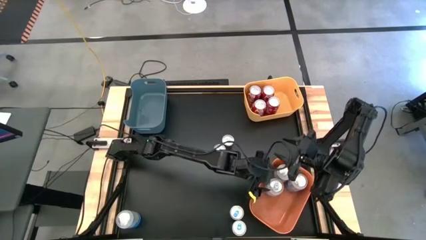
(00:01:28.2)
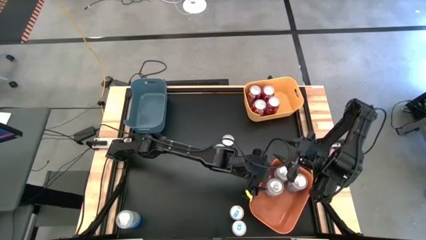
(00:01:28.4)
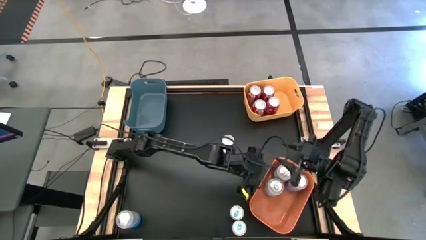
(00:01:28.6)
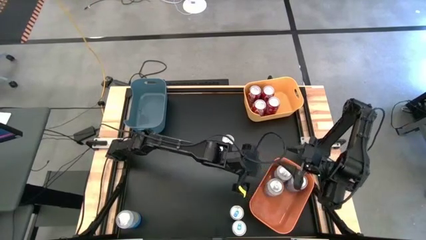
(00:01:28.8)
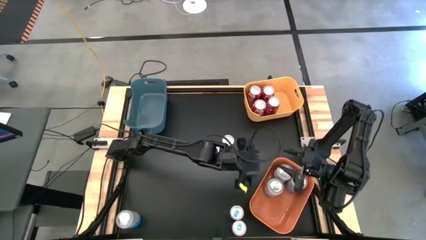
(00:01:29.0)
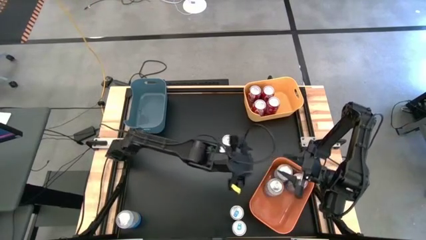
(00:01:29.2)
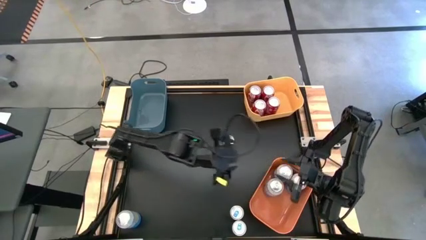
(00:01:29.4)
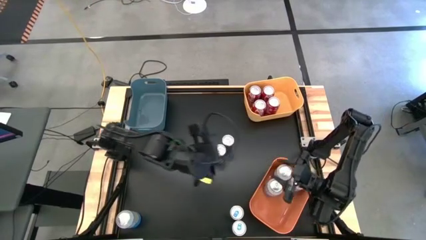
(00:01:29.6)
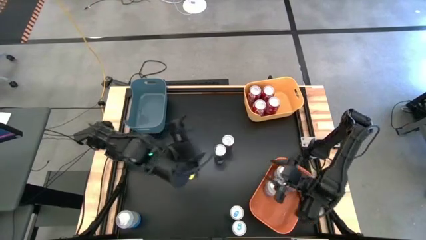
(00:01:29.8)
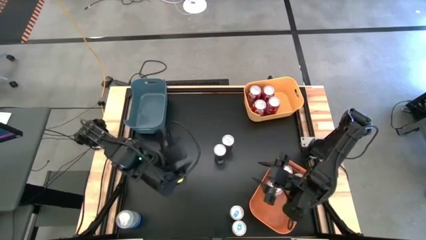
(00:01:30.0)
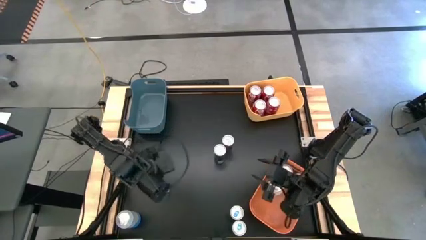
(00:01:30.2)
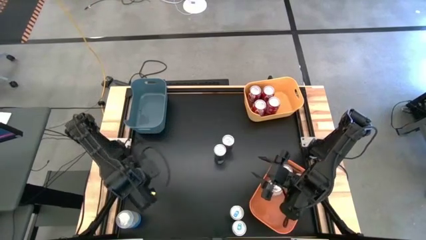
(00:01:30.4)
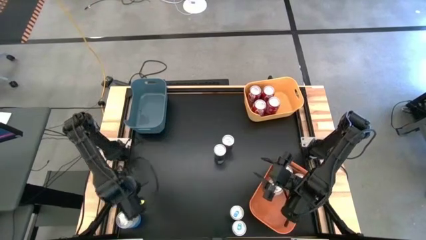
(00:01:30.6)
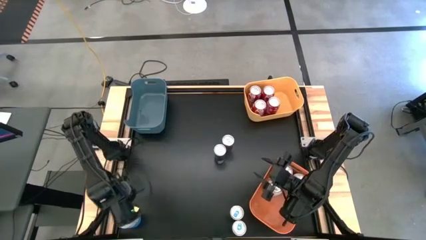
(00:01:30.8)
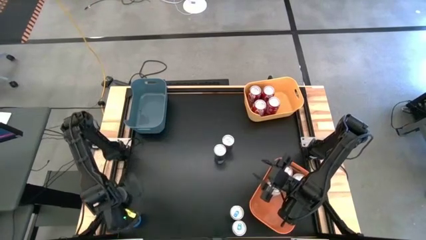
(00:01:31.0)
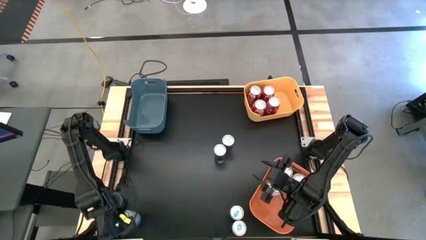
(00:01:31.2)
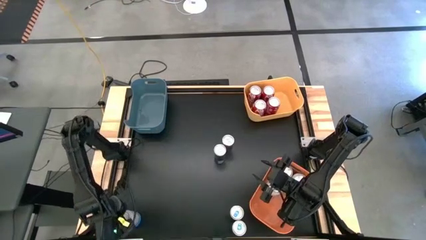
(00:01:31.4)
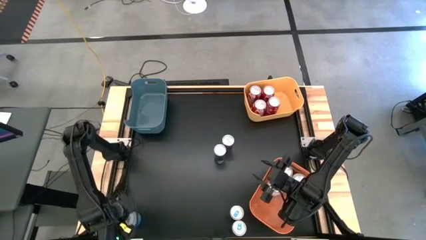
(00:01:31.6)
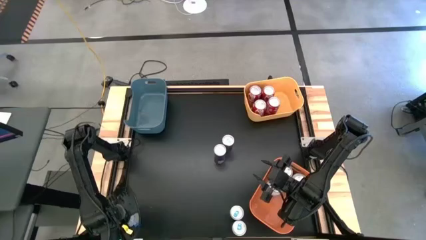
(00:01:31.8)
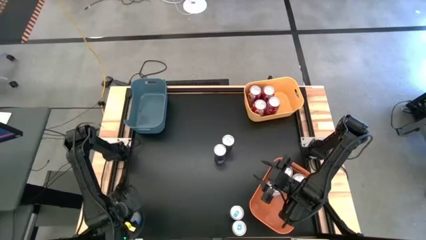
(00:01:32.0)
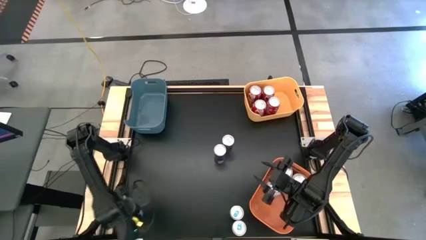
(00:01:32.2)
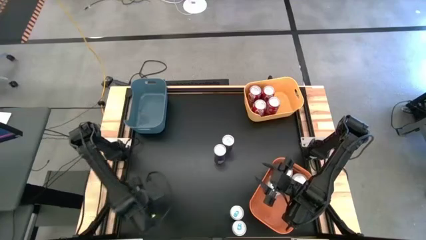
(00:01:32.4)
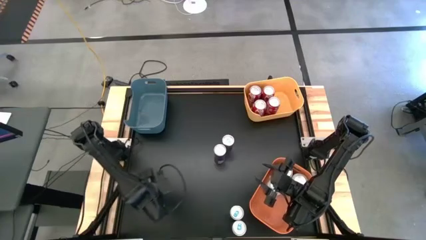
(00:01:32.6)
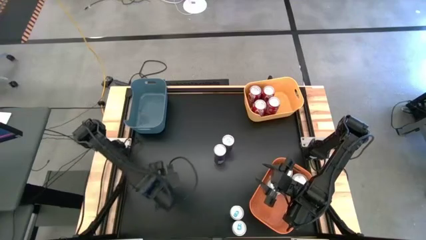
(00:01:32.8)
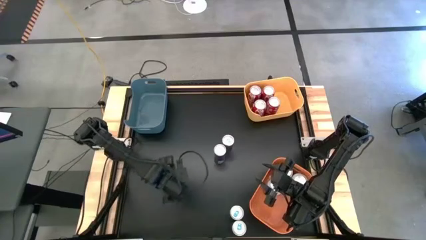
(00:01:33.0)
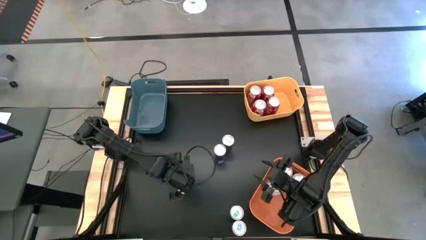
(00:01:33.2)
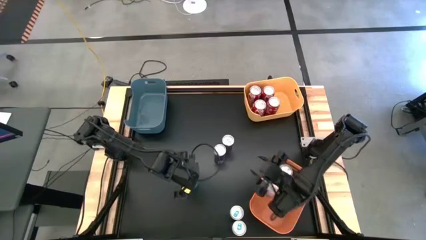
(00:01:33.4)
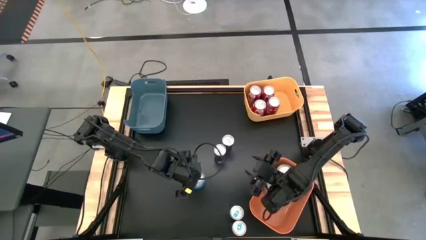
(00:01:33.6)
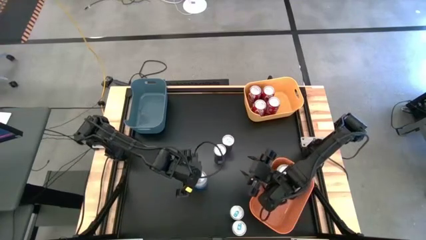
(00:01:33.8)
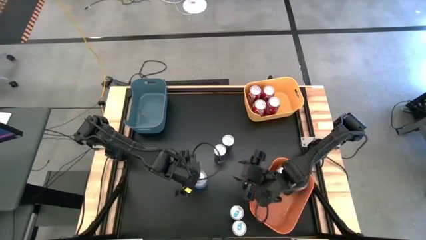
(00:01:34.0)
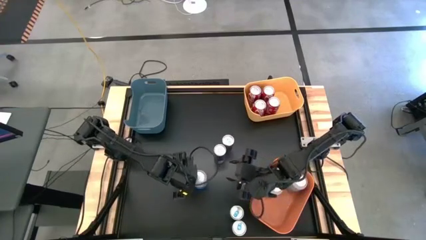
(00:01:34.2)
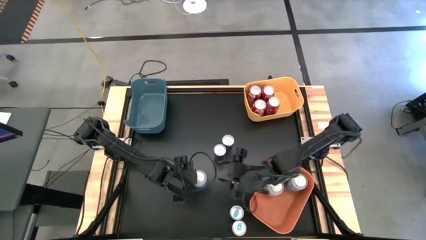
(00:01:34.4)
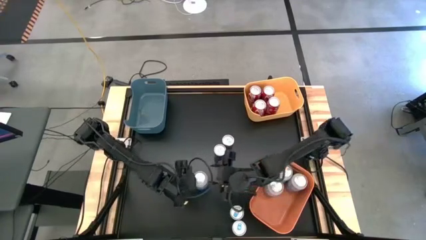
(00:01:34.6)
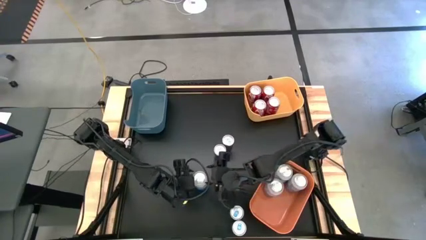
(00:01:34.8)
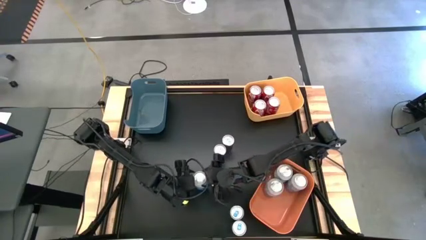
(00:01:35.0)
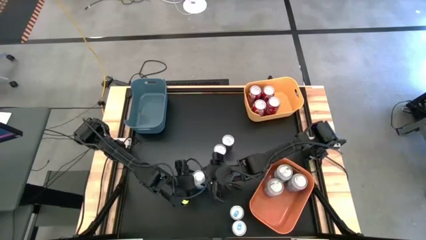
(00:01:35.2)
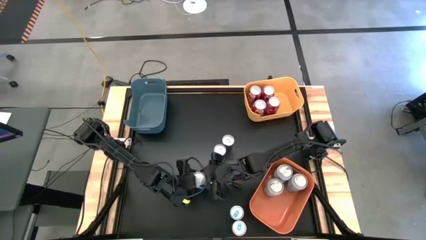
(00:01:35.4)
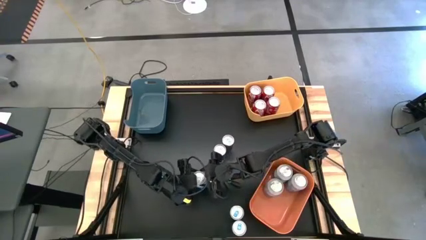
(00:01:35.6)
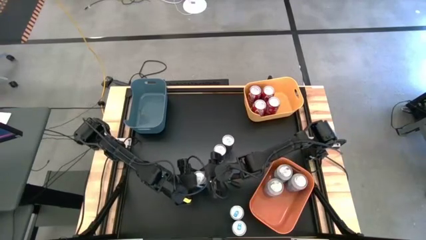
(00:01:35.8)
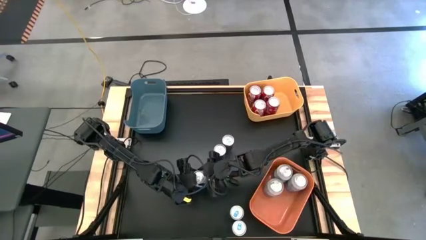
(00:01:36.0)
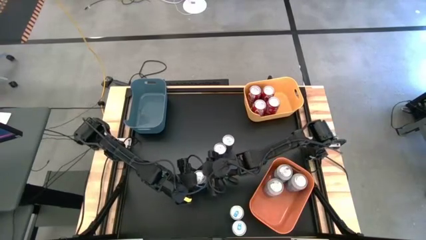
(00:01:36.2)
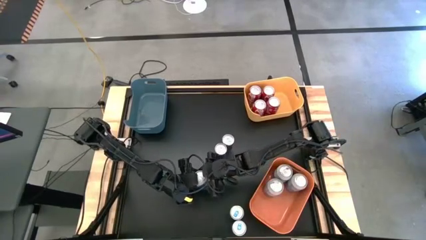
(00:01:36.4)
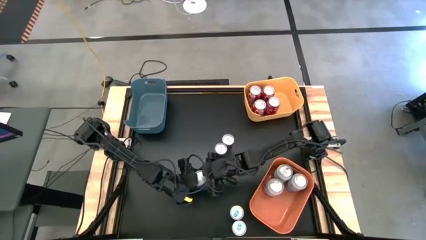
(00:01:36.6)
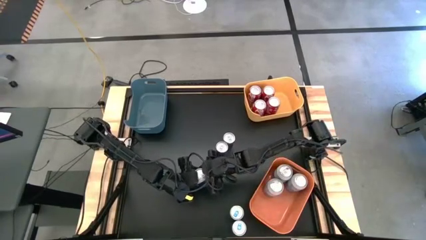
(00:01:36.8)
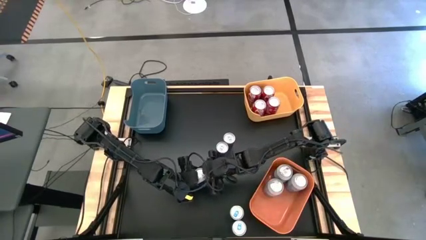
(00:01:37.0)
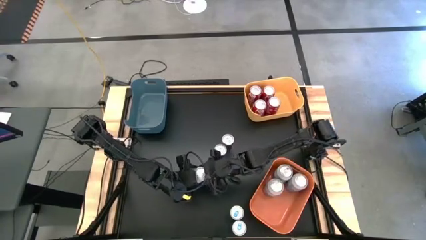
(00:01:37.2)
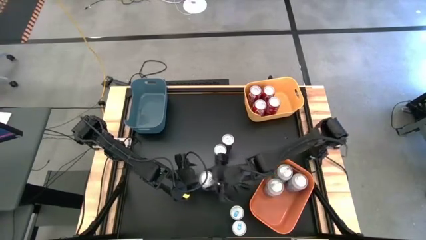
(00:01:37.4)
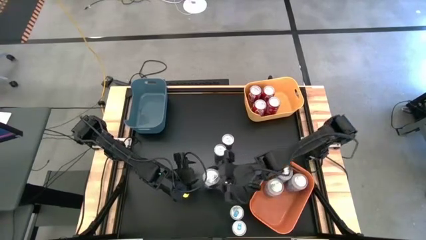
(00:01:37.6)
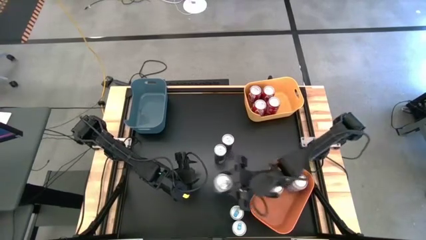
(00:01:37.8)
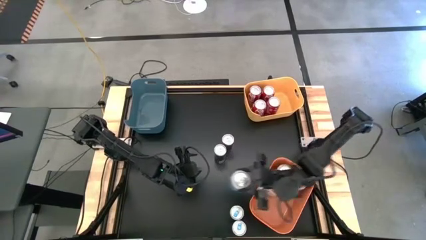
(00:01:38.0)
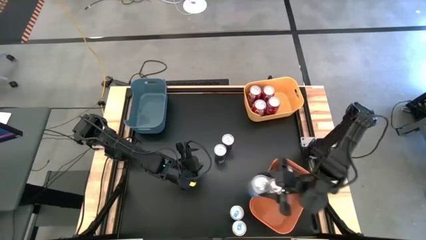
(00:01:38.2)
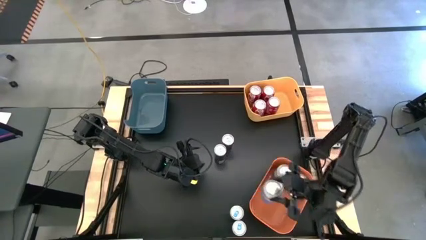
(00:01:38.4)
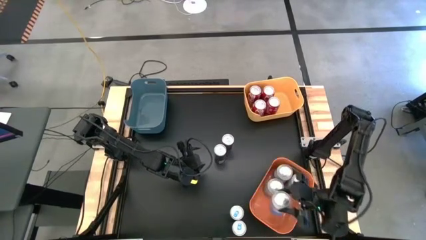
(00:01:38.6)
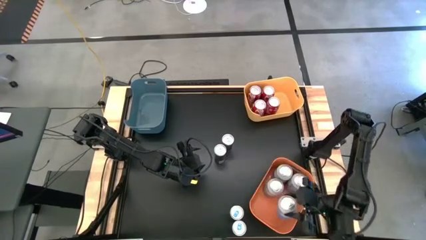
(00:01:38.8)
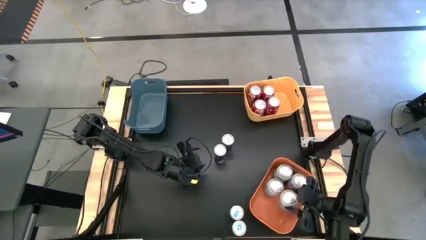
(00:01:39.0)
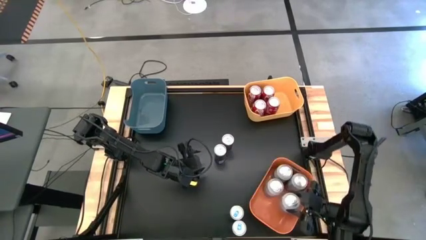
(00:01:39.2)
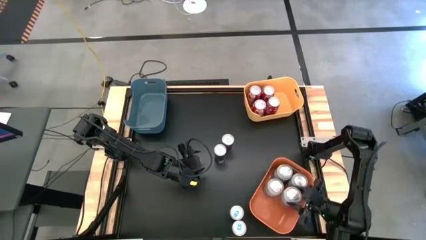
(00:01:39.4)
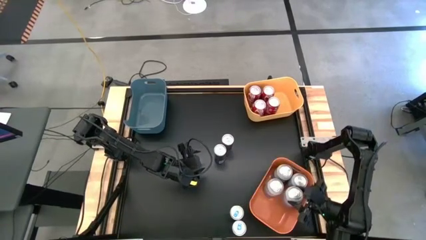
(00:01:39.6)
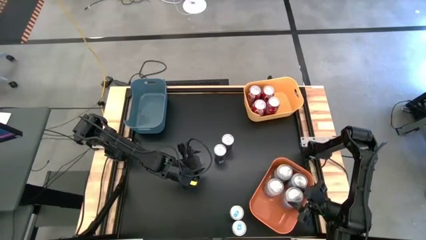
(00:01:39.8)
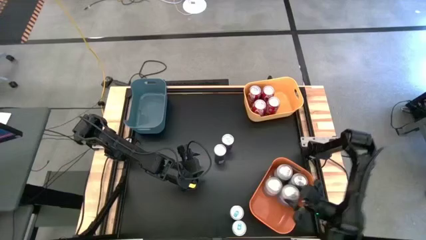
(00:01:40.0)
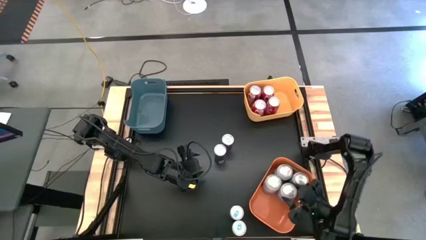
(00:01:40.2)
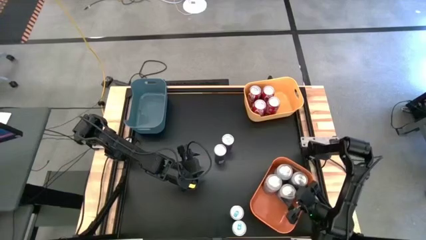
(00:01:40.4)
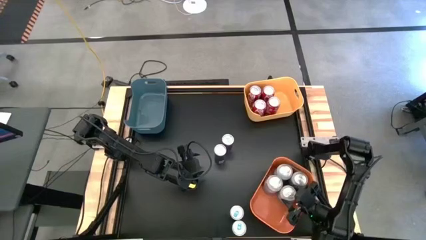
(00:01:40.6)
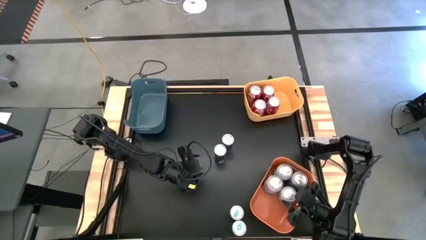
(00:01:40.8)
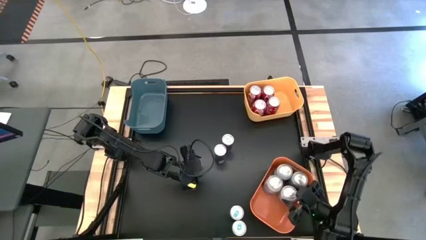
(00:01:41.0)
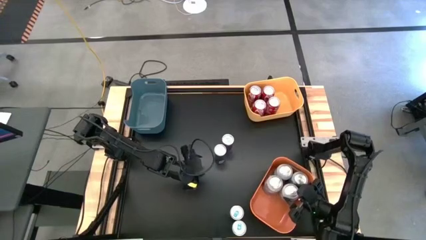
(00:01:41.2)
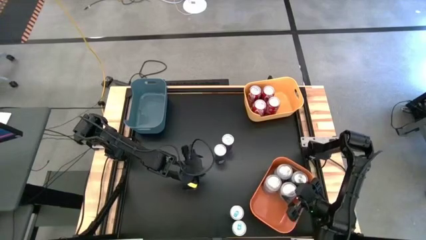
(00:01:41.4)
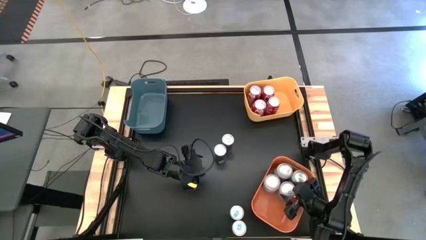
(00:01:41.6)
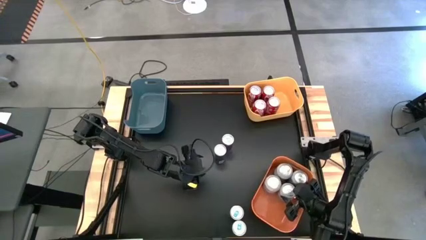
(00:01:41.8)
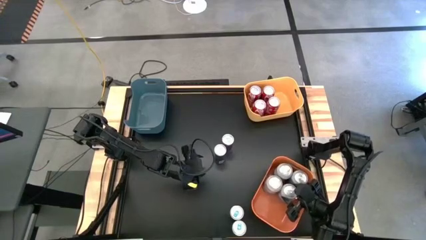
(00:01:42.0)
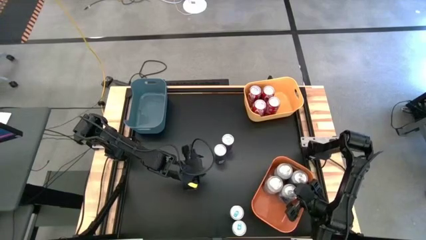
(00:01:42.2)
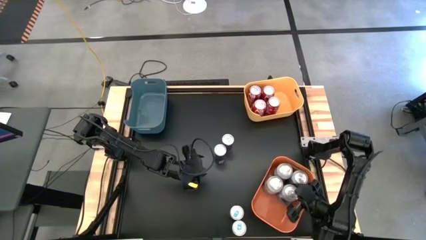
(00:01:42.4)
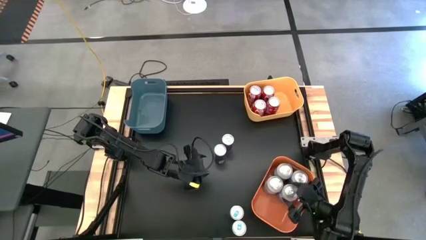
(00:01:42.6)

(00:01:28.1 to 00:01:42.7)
Task: Sort soda cans
Put the white soda can into the orange bin

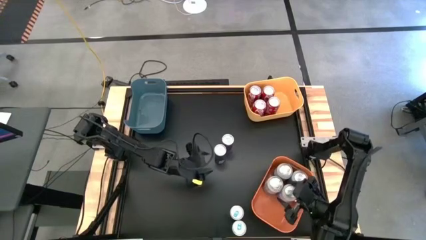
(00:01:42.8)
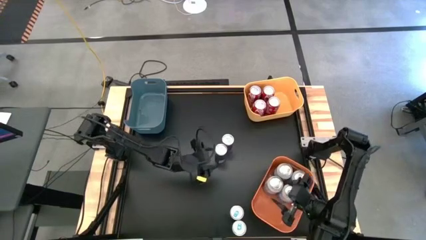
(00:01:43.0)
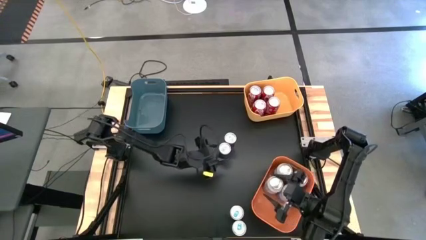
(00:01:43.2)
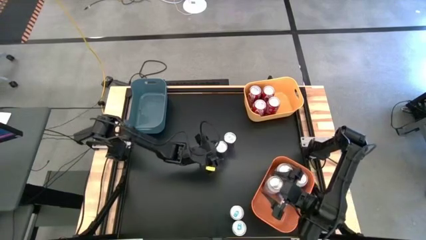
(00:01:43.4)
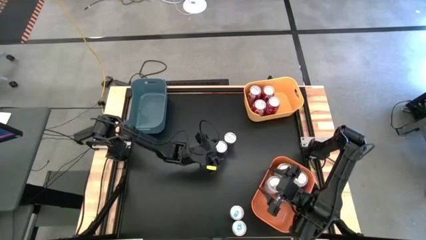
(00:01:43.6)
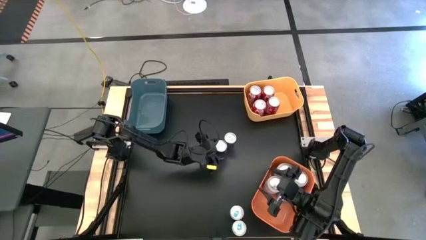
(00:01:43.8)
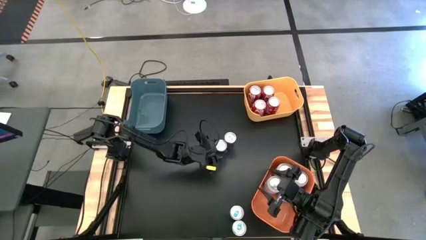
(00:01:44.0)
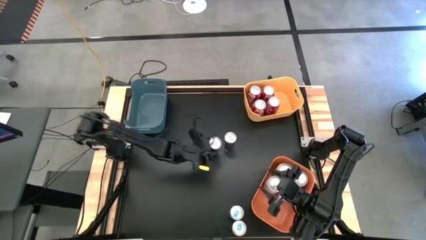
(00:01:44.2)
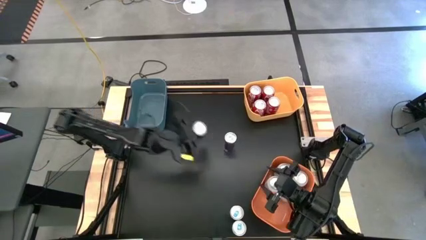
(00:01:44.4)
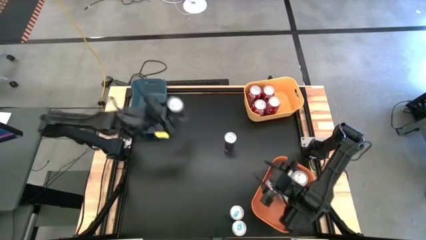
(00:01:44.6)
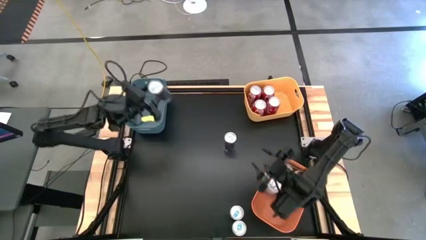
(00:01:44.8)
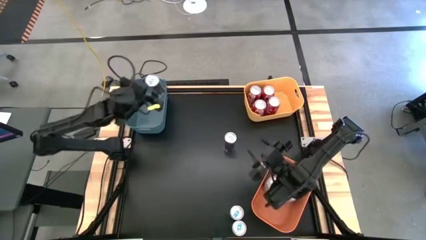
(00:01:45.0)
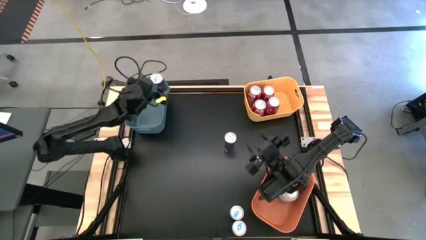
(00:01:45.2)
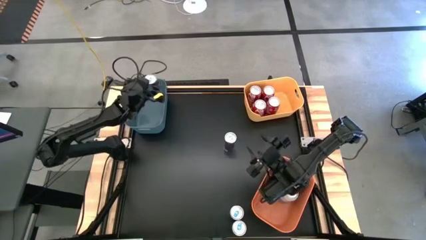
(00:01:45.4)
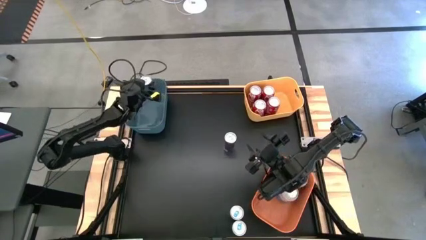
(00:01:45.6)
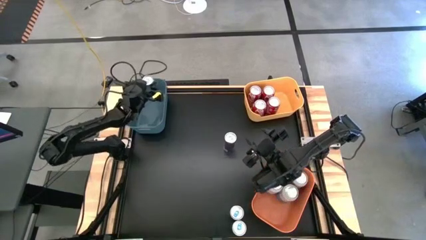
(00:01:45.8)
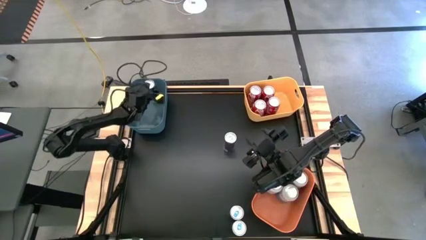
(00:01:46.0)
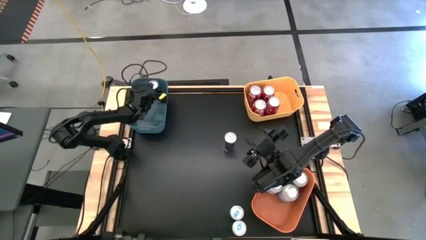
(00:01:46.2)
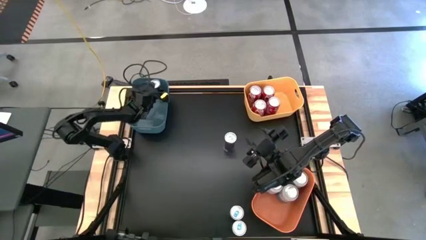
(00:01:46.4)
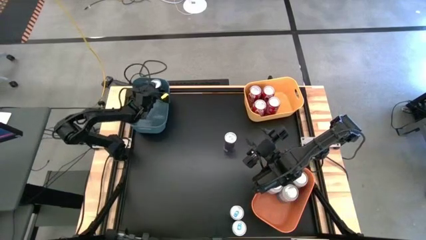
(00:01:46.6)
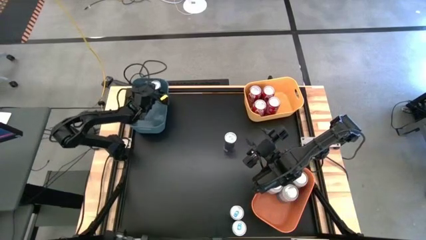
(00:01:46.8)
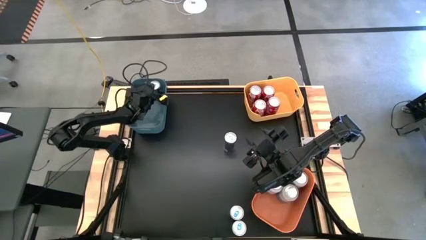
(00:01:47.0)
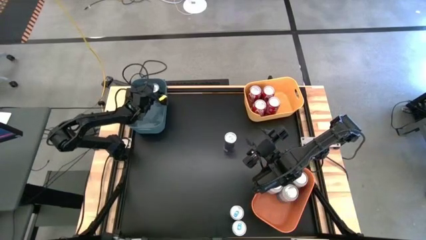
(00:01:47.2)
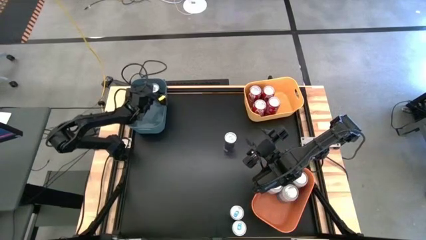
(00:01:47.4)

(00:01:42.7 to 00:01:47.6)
Put the middle top blue soda can into the blue bin
